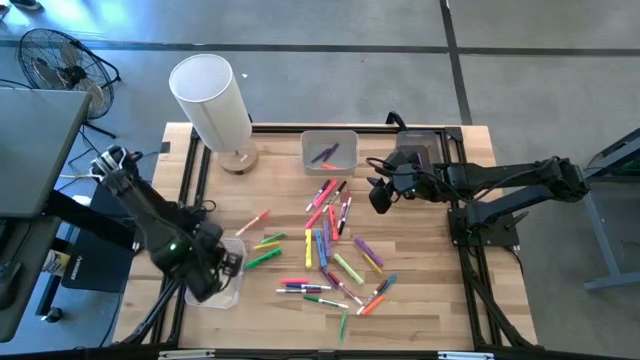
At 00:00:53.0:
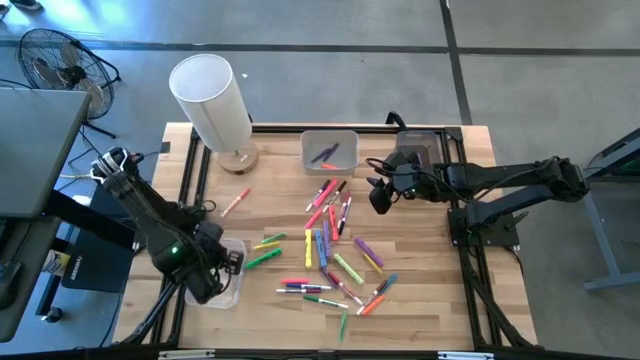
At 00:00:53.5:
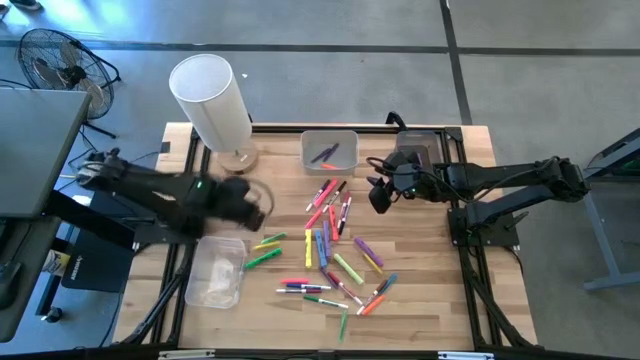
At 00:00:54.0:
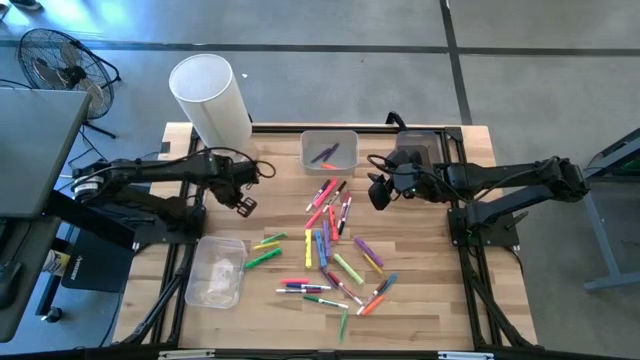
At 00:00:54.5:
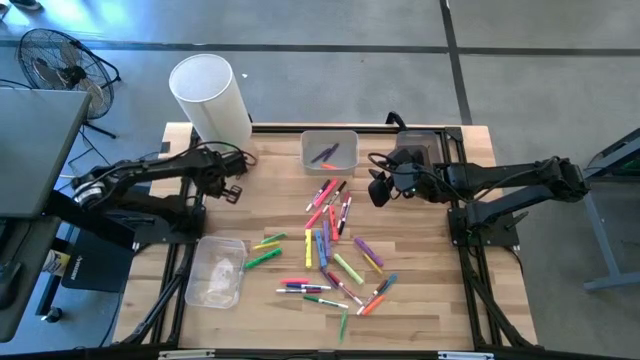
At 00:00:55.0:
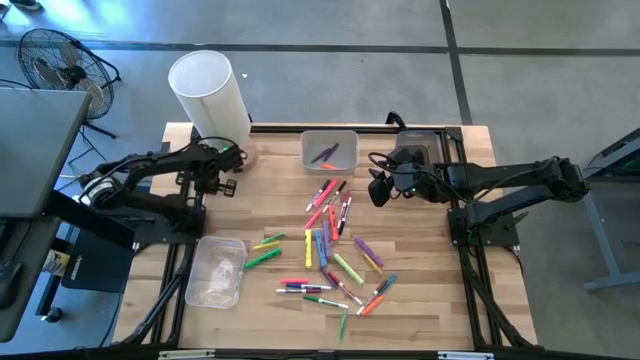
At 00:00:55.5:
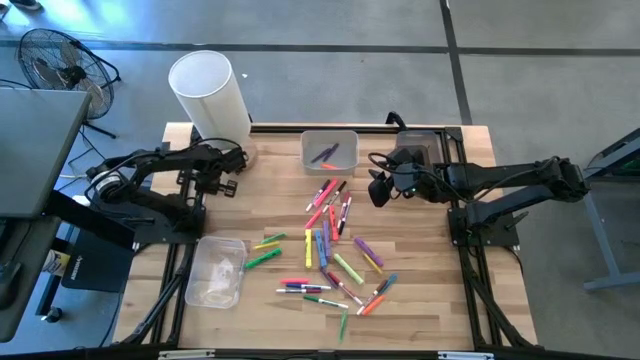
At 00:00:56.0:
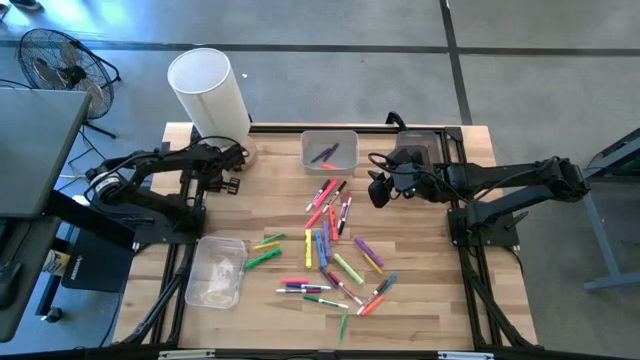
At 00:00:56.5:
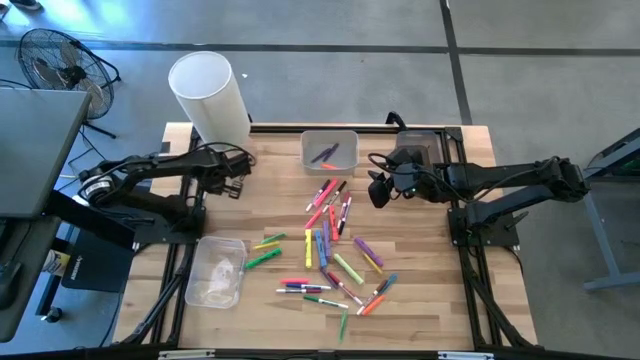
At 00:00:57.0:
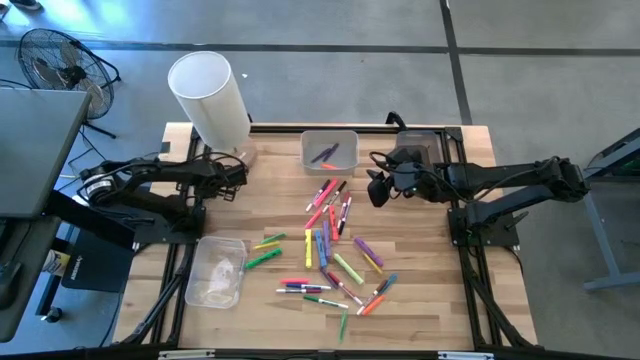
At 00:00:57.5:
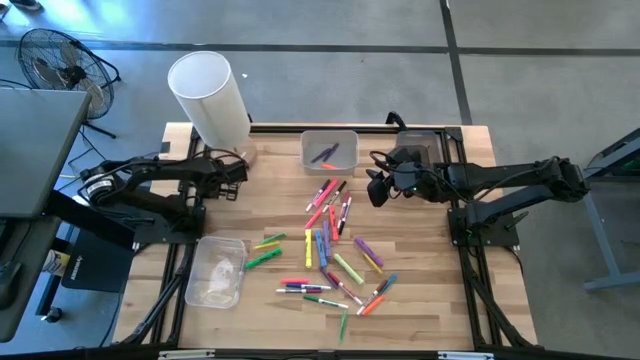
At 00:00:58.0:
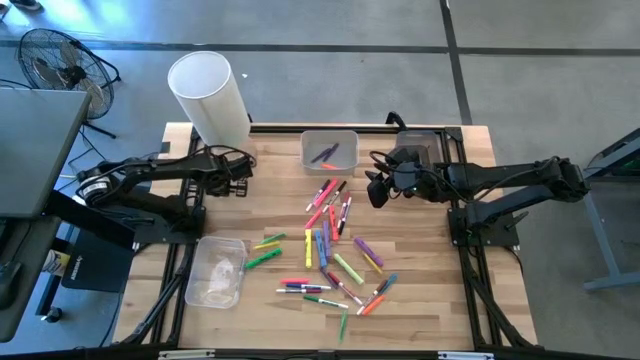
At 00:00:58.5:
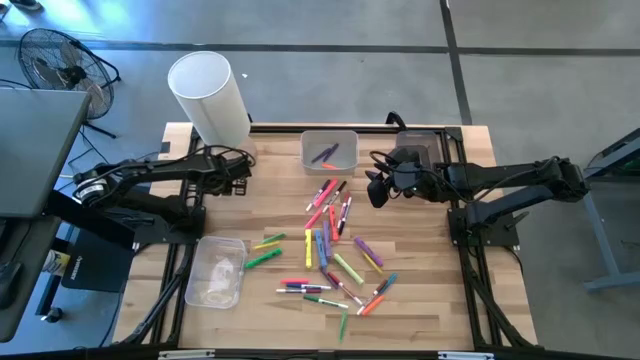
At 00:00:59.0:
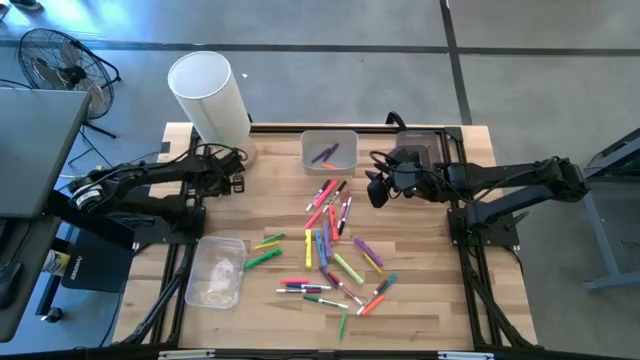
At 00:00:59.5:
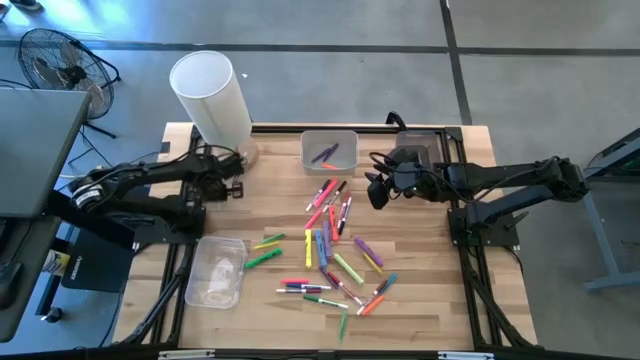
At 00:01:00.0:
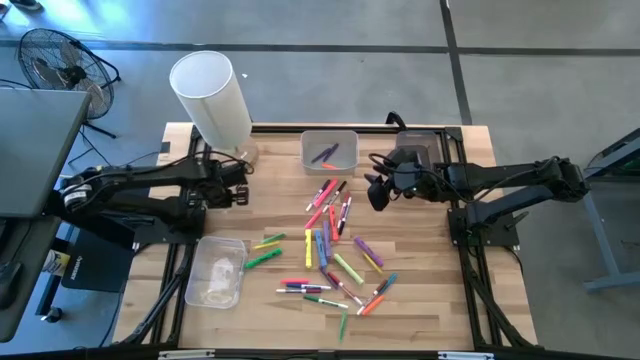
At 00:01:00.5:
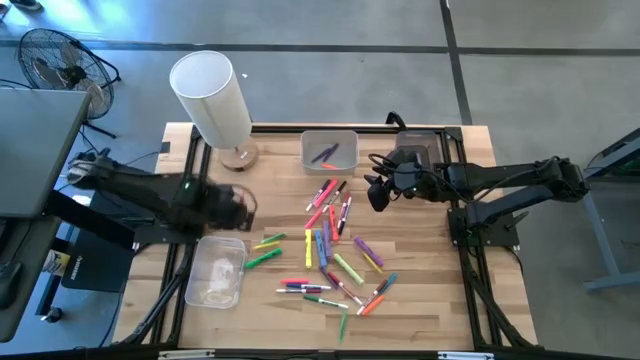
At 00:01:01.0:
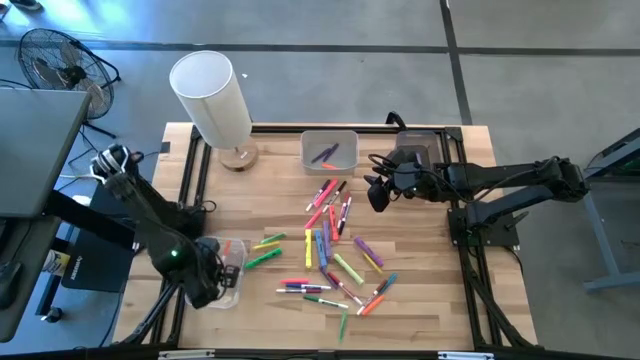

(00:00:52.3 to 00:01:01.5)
Task: Pick & Place Markers
Put the orange marker pen into the transparent bin

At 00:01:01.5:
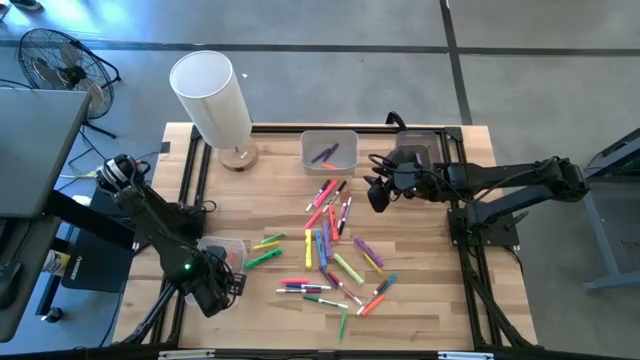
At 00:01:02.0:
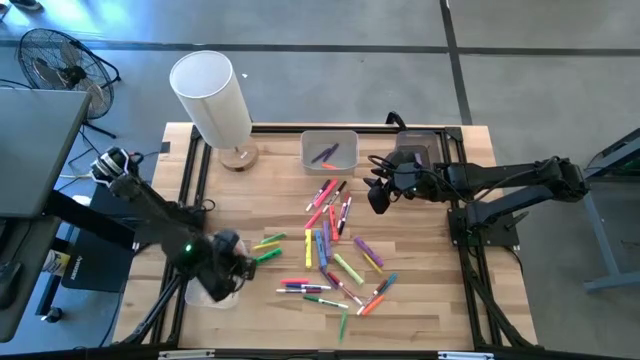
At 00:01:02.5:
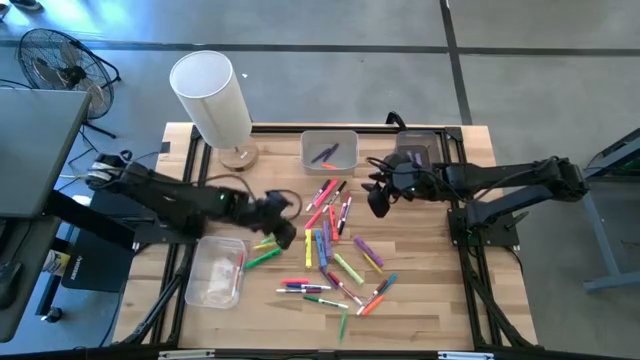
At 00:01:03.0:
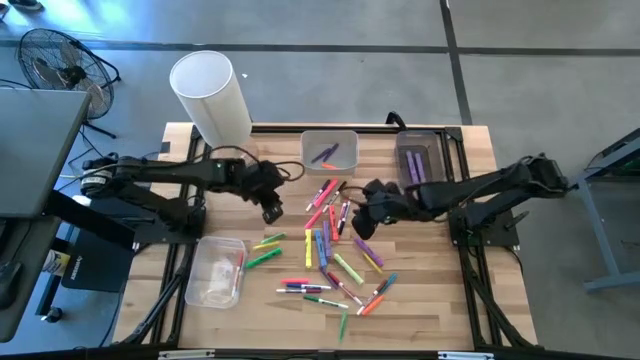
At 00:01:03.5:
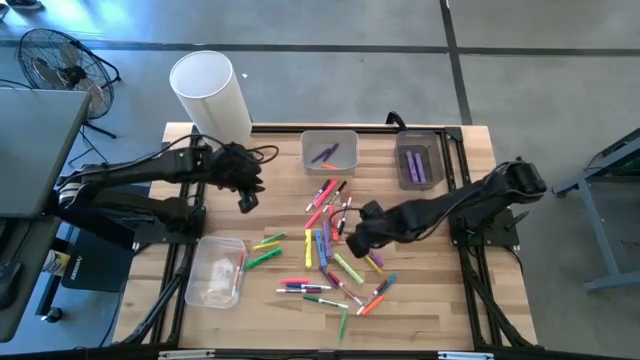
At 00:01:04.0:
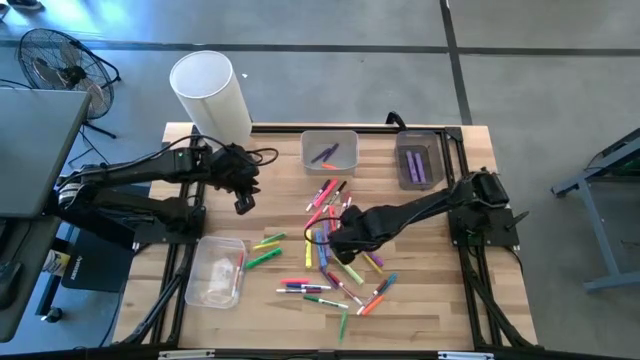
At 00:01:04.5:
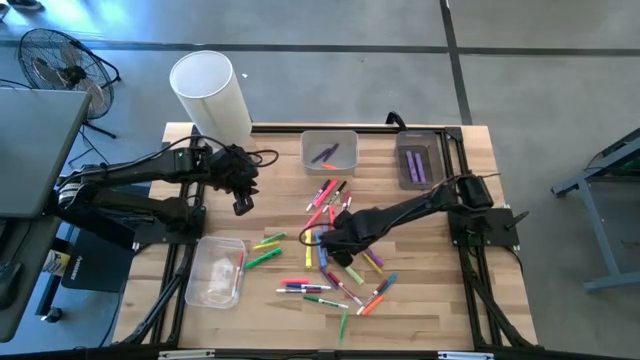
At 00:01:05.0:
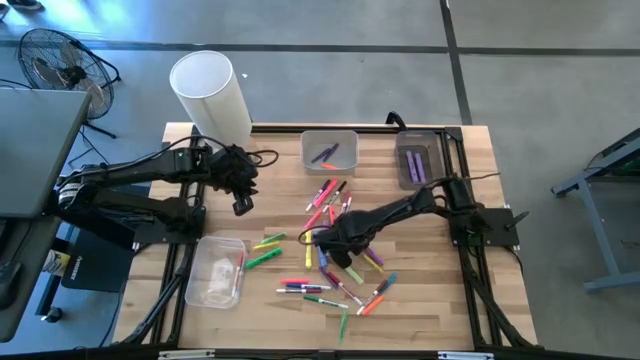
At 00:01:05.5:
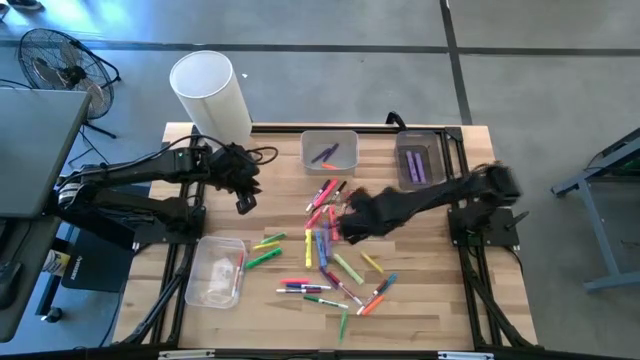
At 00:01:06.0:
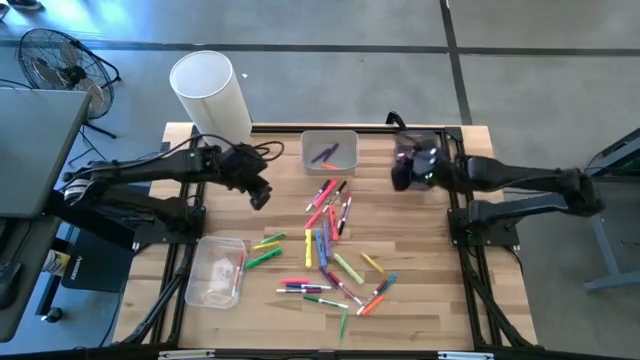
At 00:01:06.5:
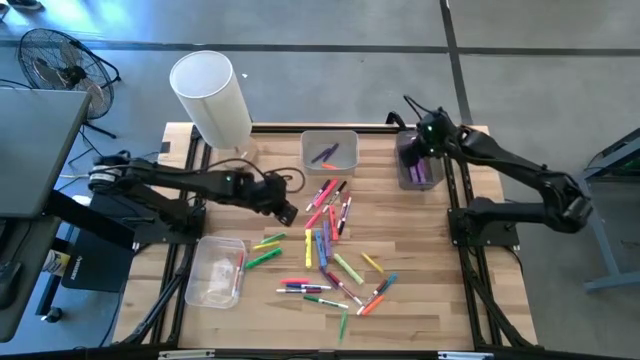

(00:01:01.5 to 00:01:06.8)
Put the purple highlighter pen into the black bin

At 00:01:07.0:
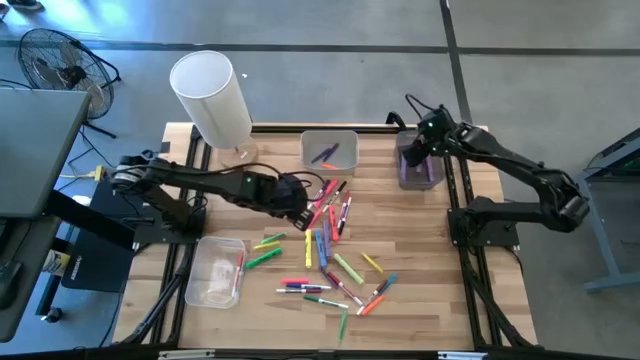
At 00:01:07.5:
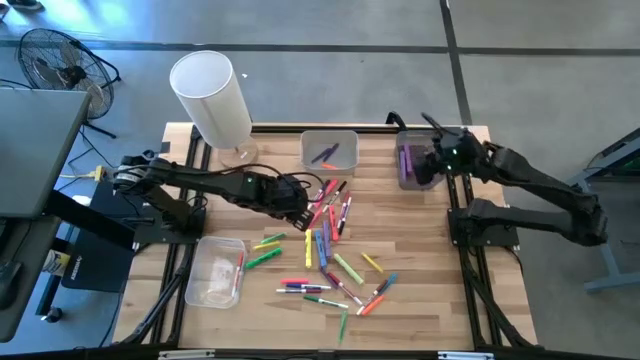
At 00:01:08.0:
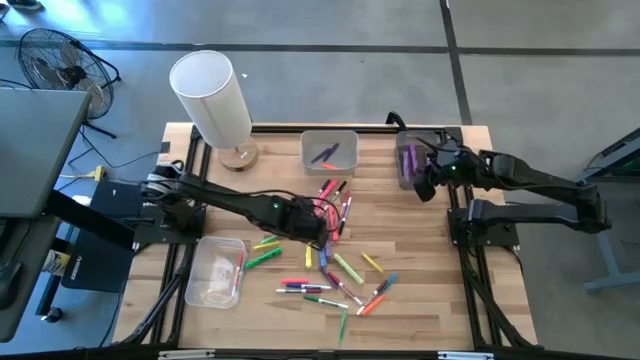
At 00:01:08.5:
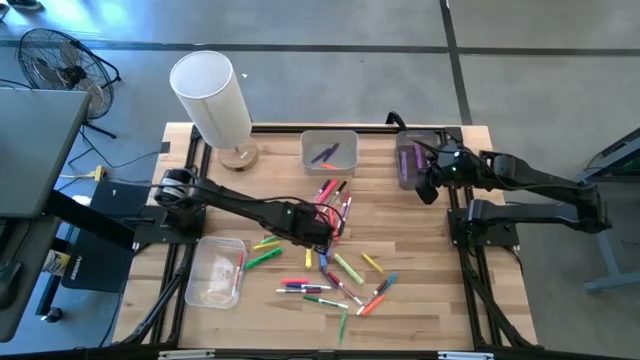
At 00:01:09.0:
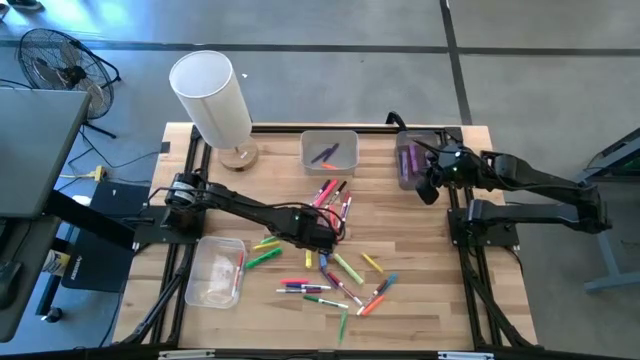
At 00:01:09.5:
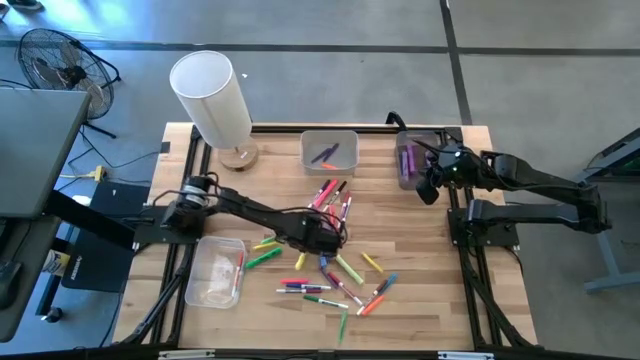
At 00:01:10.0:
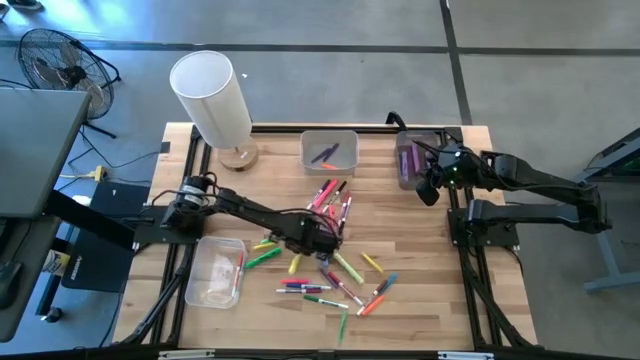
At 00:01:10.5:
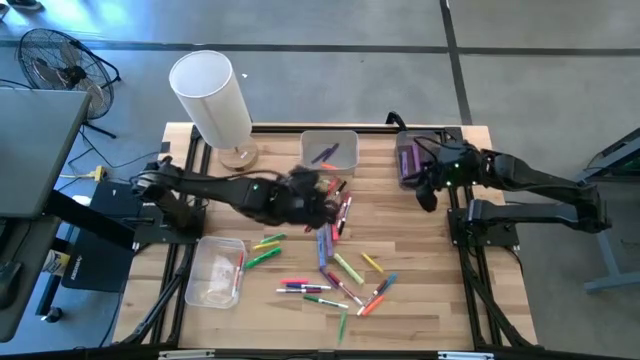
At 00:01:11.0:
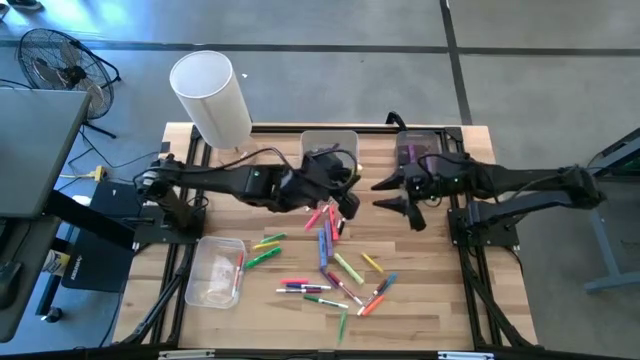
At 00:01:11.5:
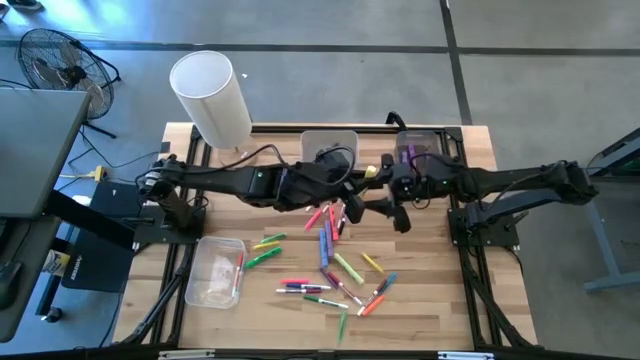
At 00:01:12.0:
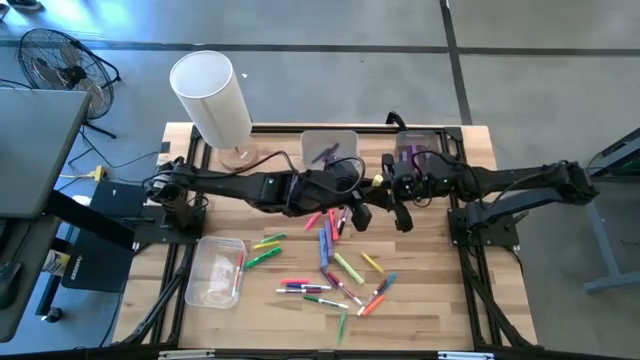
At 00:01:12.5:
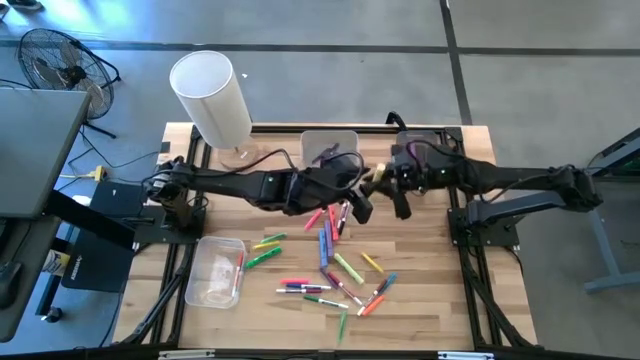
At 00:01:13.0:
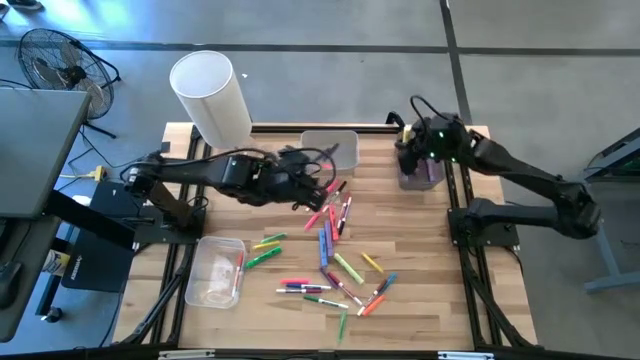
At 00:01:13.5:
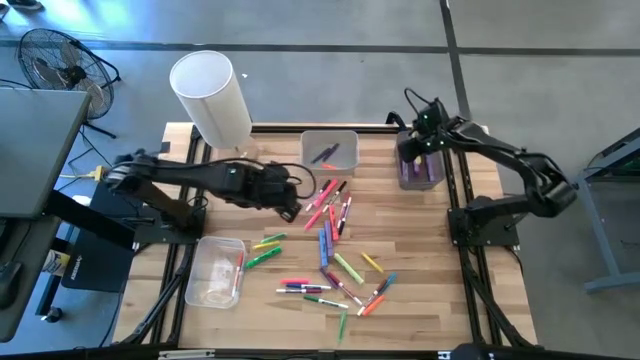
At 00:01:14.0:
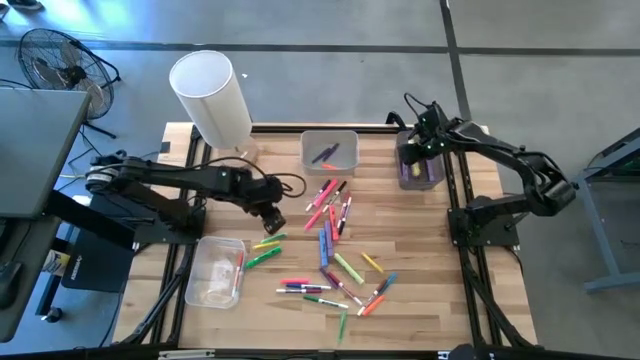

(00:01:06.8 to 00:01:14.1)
Put the yellow highlighter pen into the black bin
